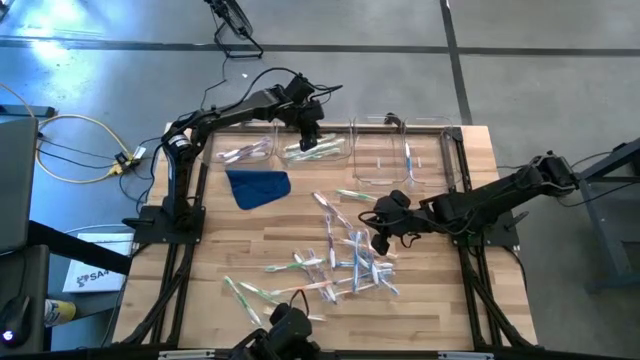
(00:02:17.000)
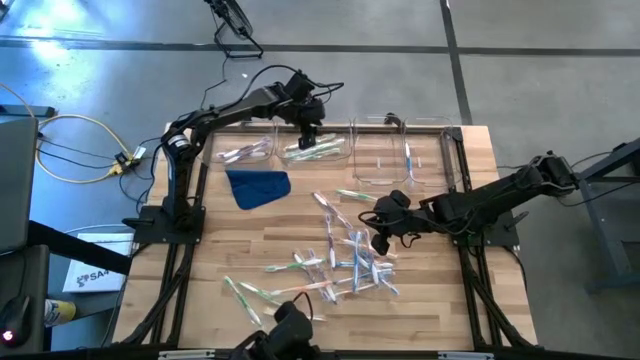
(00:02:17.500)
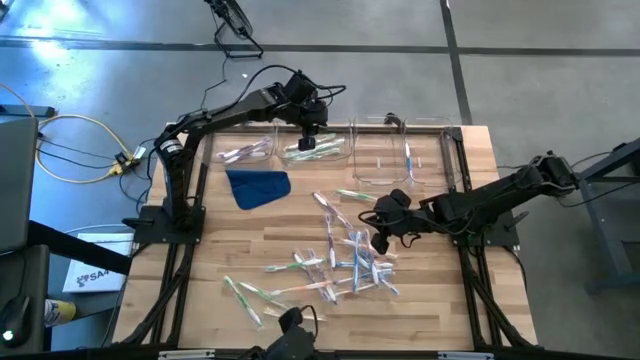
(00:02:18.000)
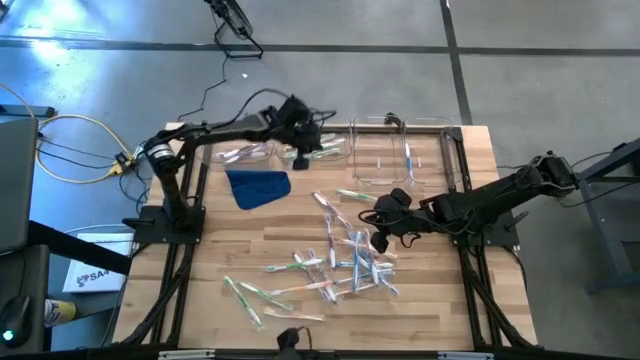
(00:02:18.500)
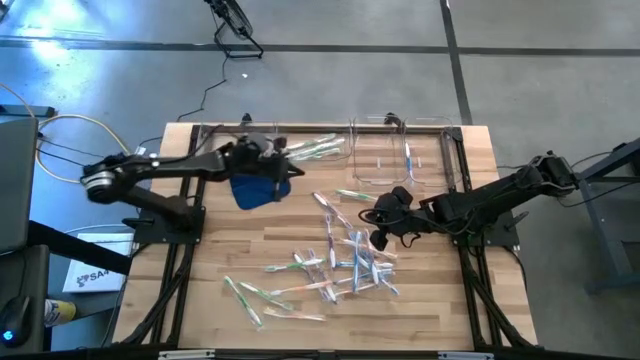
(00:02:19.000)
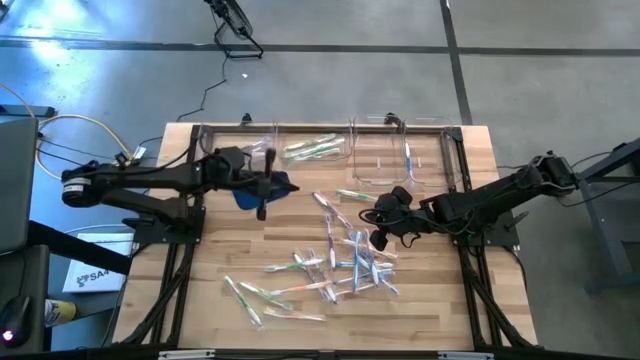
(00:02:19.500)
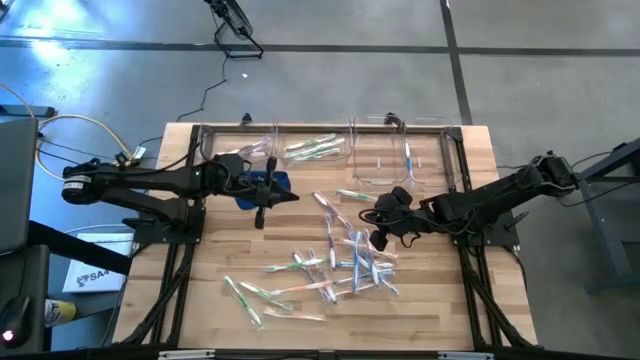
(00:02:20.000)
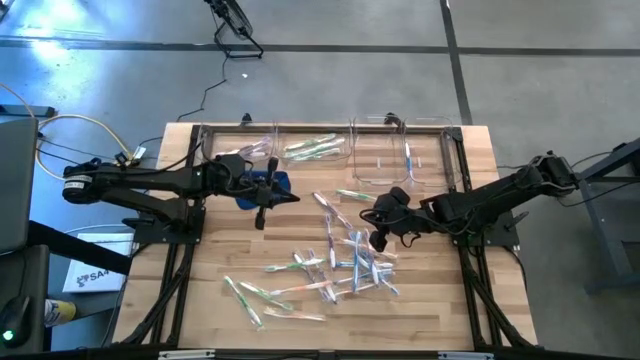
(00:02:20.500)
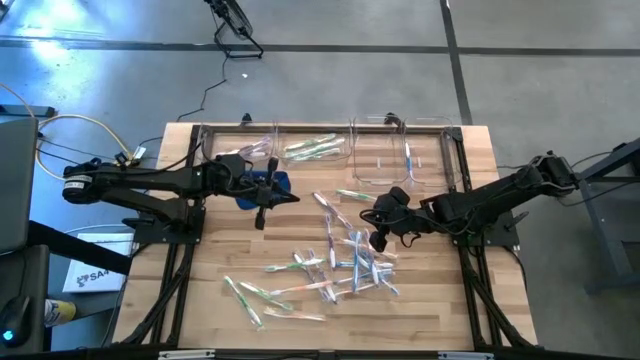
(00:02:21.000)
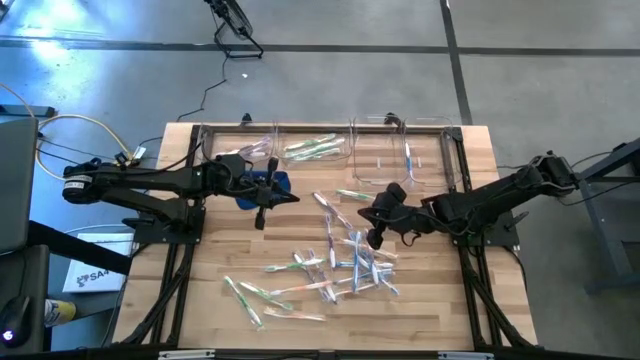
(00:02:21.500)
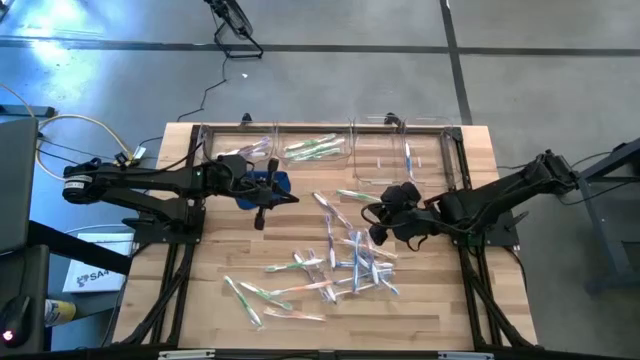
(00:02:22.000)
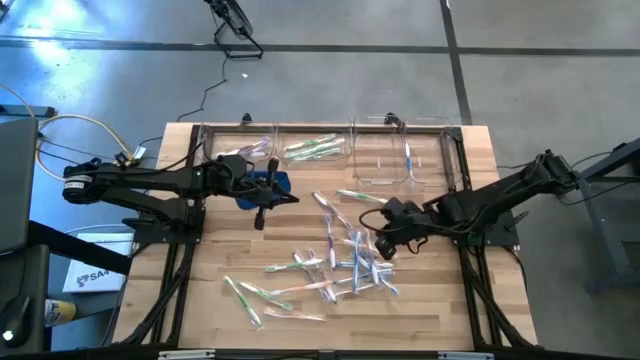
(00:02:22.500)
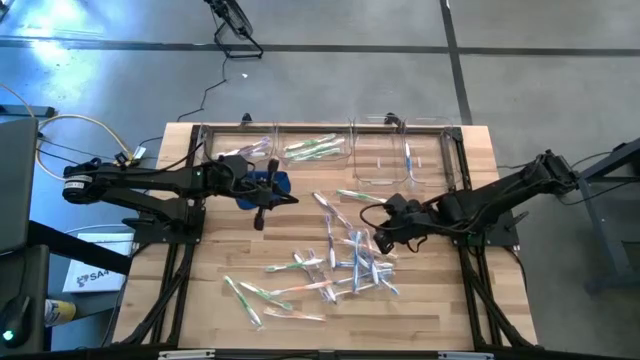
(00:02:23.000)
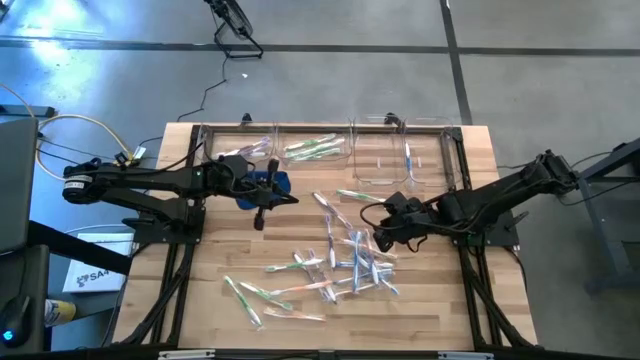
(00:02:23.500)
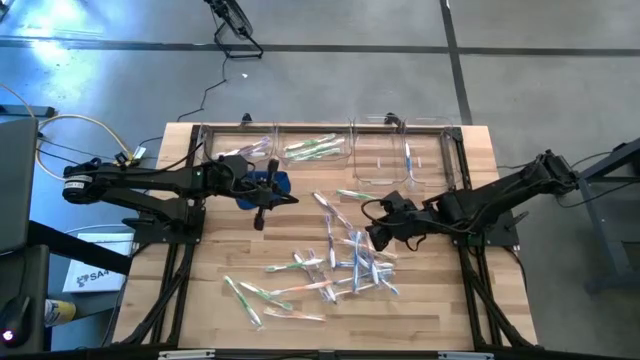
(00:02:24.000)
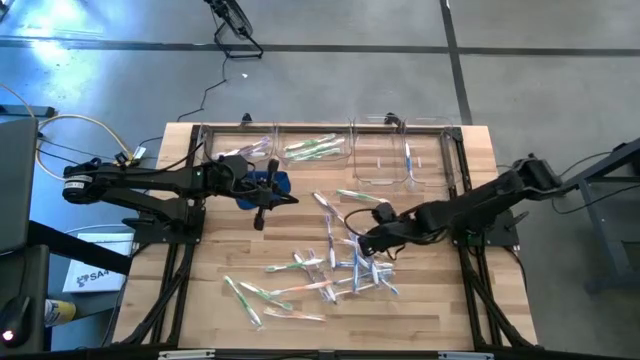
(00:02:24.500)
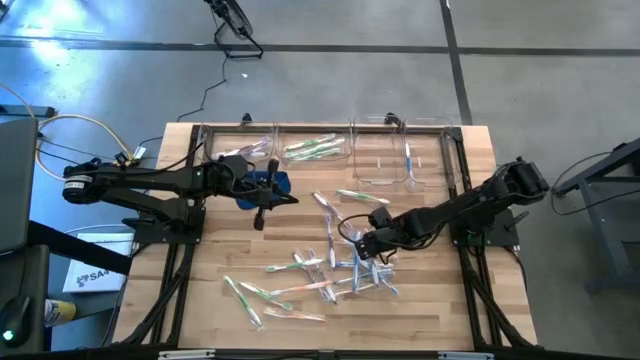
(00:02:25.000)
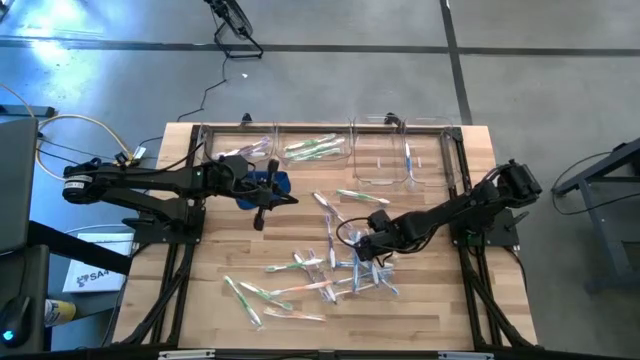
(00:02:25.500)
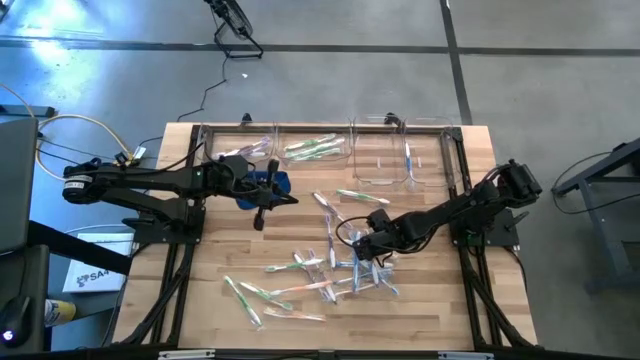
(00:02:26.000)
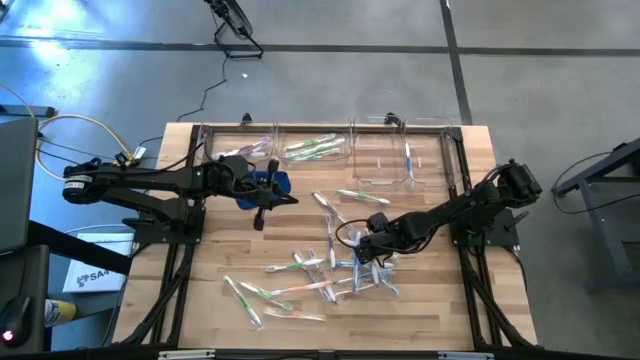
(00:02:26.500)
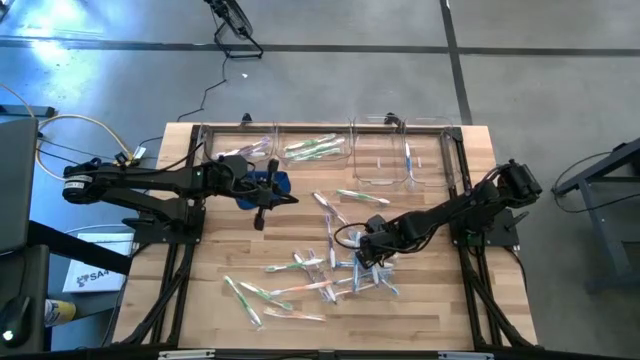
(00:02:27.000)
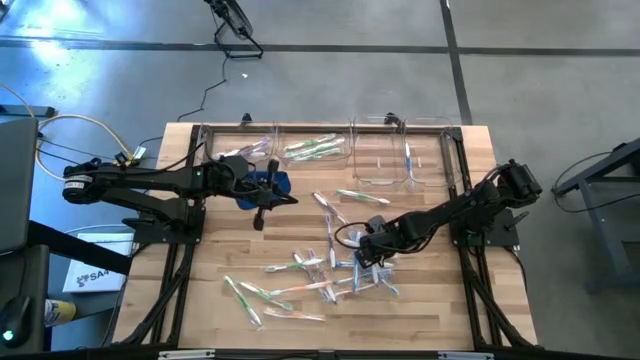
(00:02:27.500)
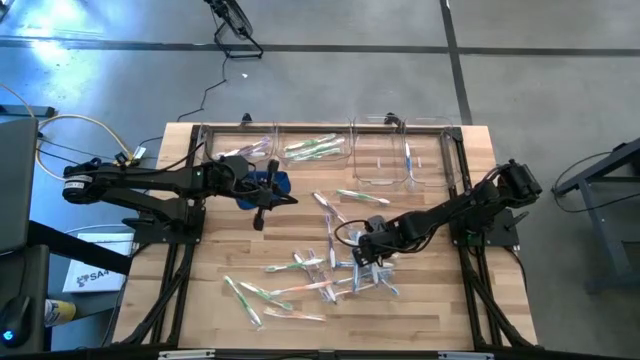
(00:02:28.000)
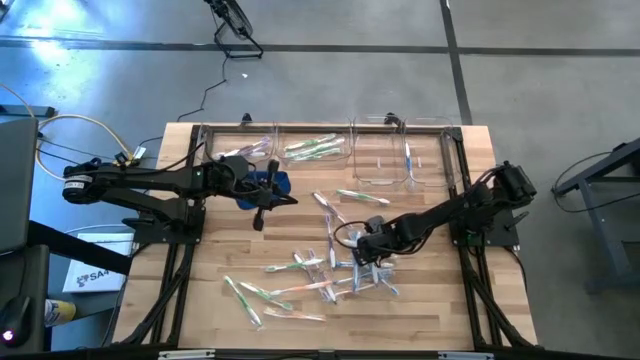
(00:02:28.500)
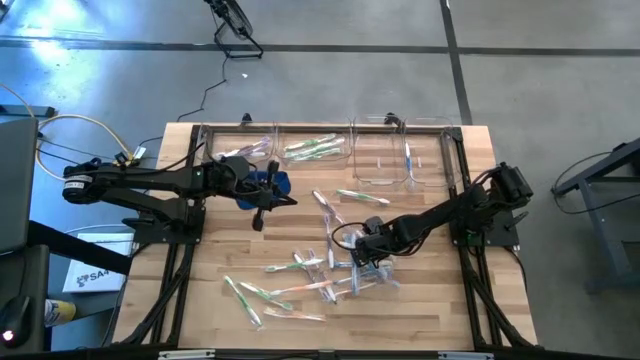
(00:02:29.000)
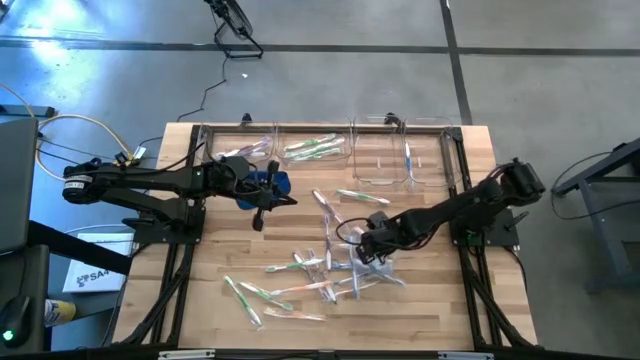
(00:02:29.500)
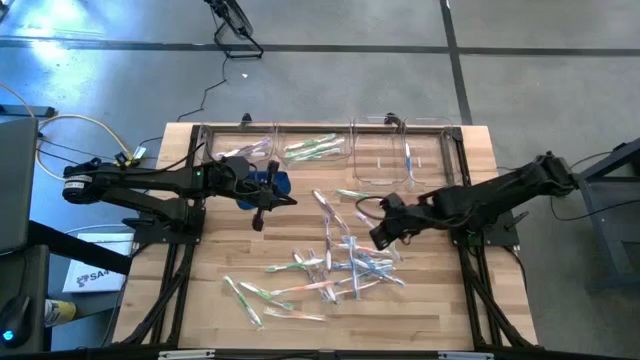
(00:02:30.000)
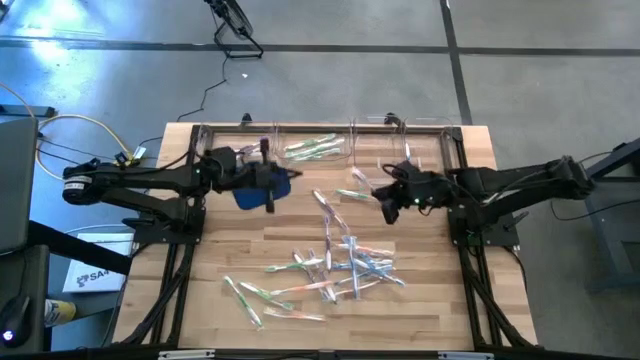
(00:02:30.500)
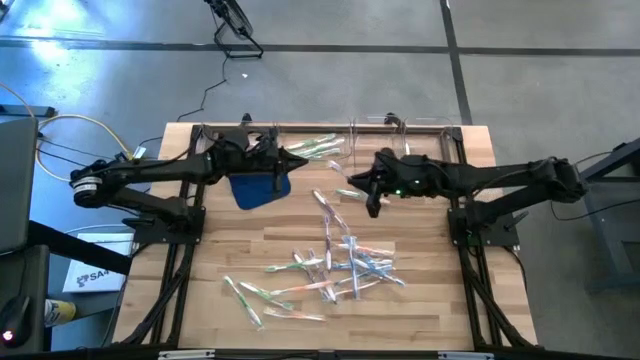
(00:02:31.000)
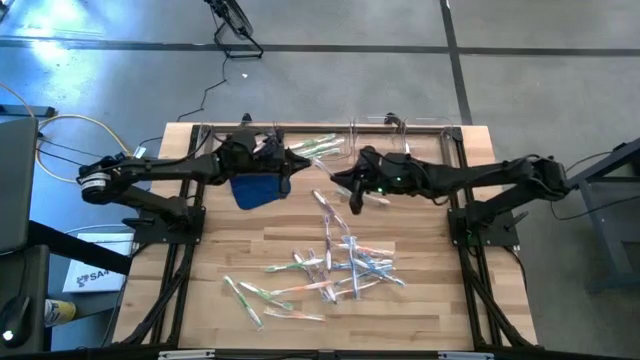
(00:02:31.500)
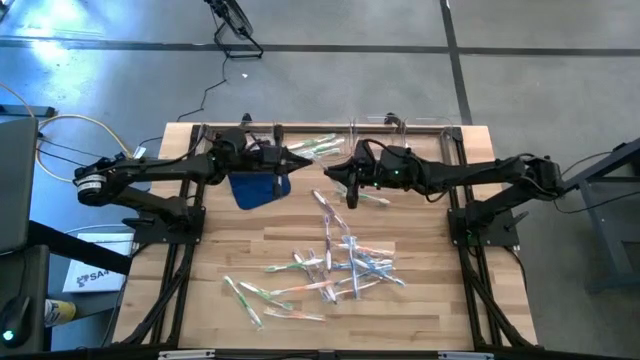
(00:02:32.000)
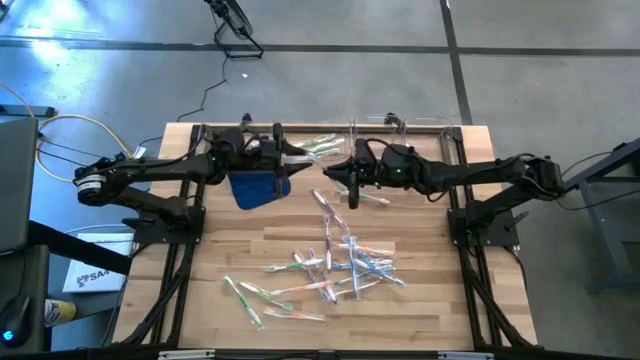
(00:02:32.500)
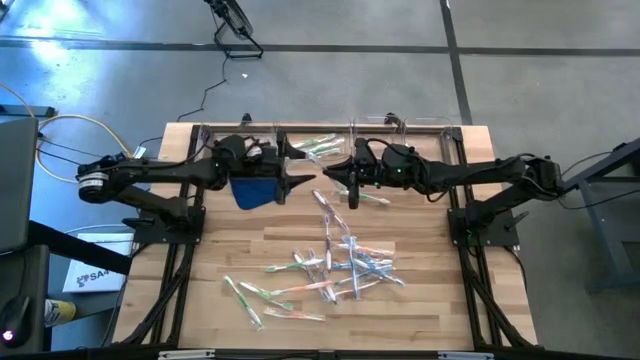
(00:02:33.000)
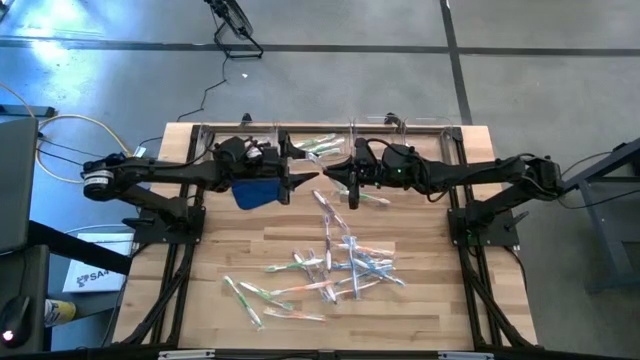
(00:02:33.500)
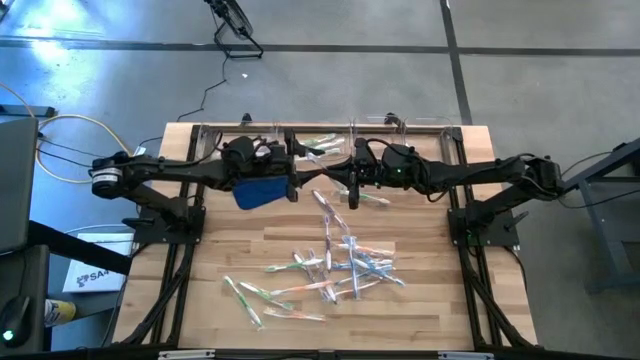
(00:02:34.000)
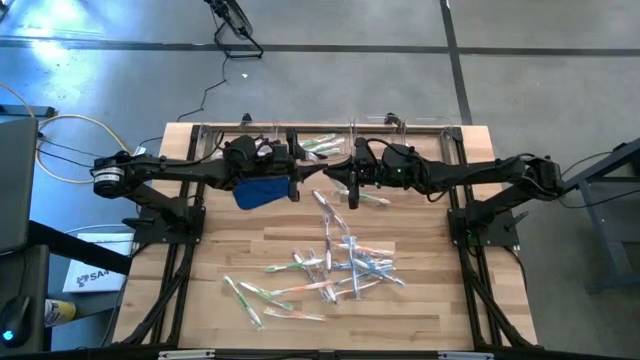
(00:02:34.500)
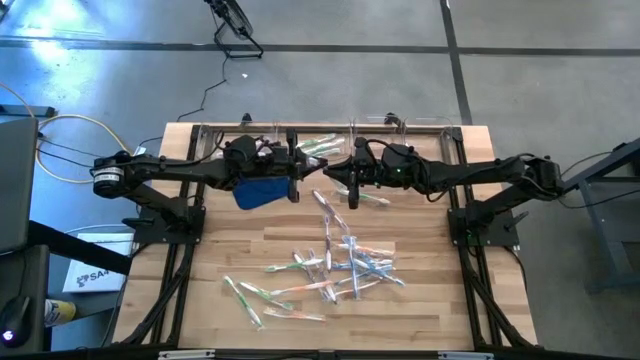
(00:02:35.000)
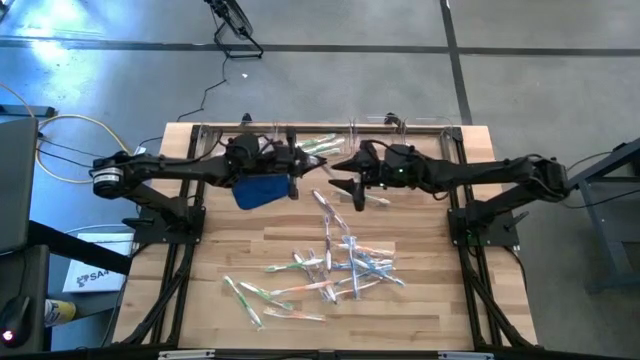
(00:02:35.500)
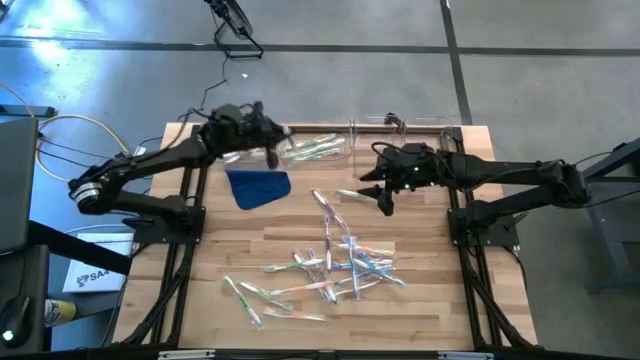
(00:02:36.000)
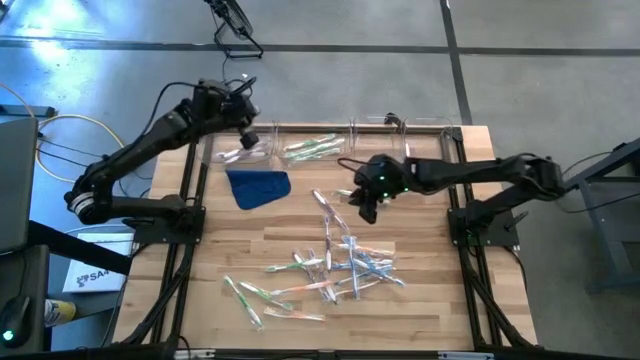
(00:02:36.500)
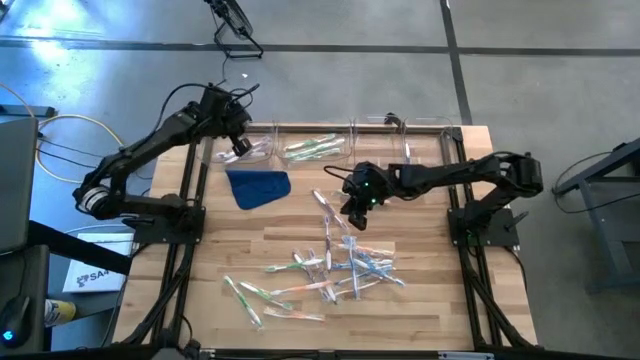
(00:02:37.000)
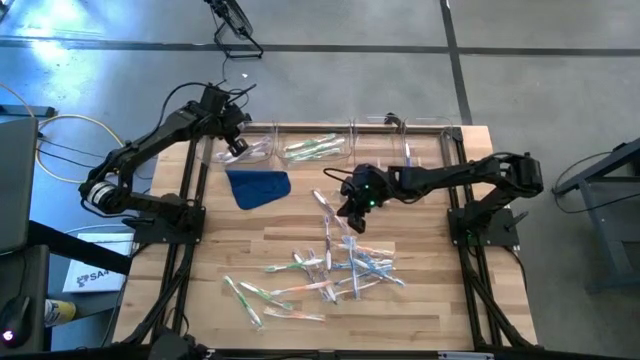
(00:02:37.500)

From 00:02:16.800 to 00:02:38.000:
Task: Pick & Place Toothbrushes
Put the violet toothbrush into the left transparent bin
